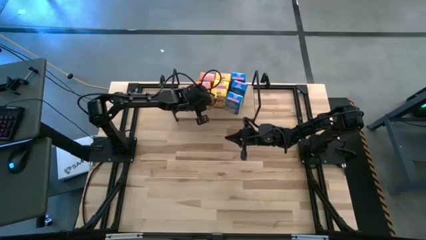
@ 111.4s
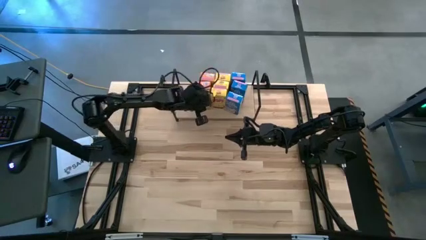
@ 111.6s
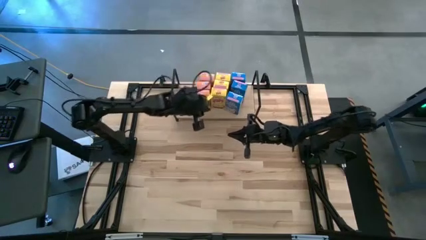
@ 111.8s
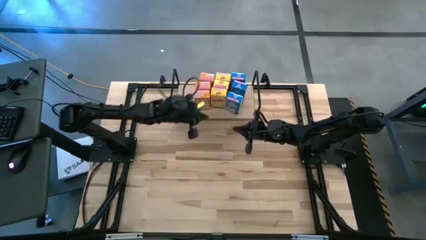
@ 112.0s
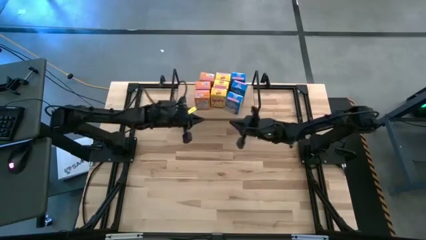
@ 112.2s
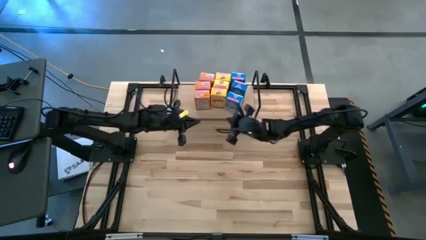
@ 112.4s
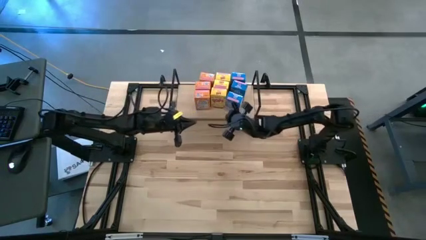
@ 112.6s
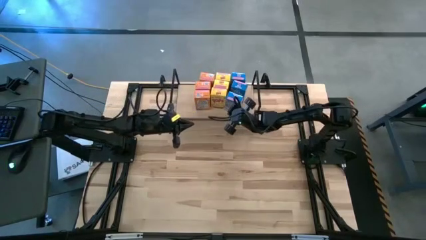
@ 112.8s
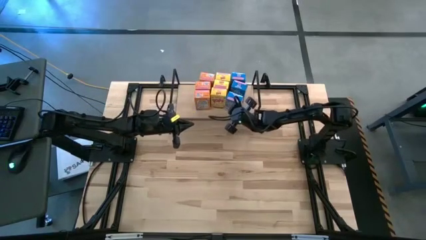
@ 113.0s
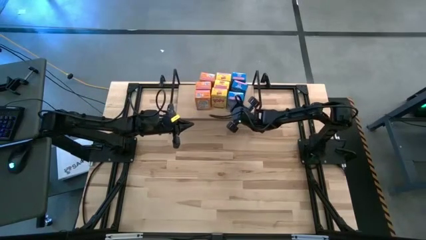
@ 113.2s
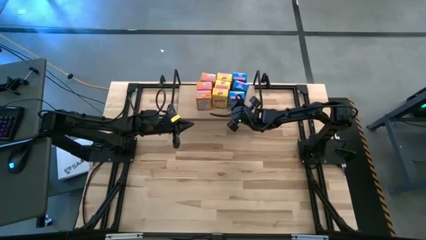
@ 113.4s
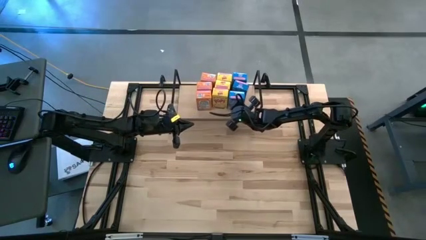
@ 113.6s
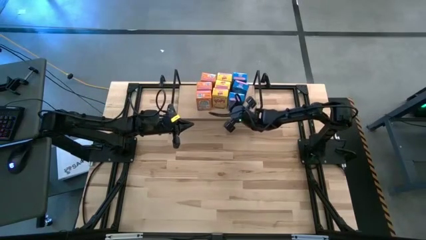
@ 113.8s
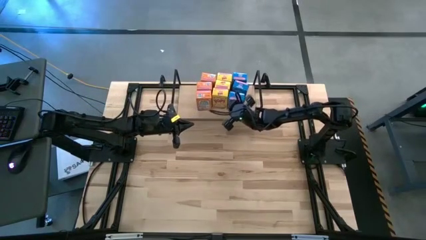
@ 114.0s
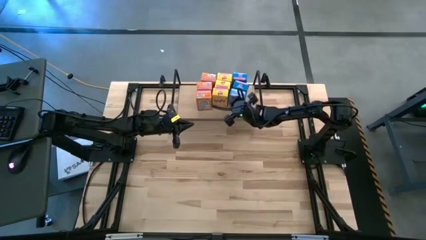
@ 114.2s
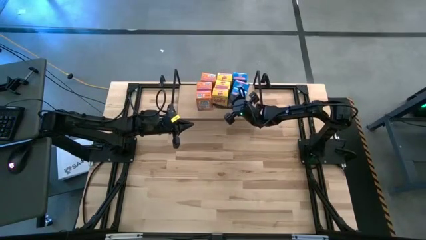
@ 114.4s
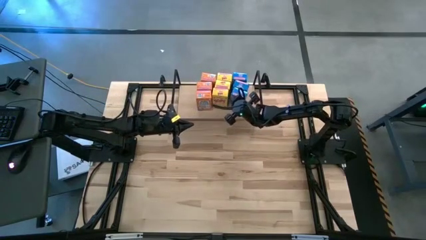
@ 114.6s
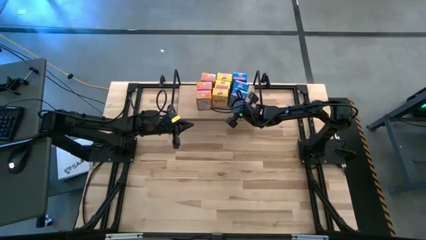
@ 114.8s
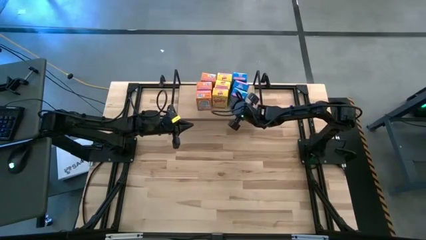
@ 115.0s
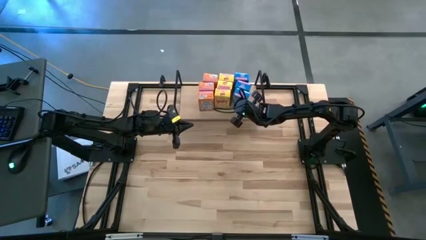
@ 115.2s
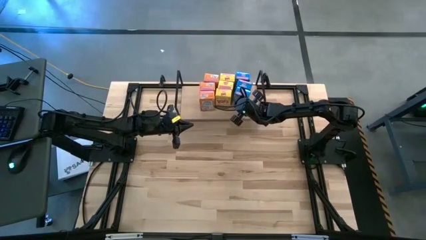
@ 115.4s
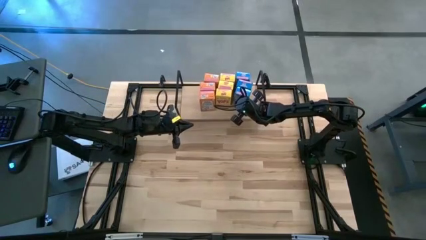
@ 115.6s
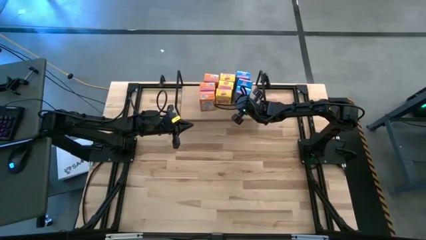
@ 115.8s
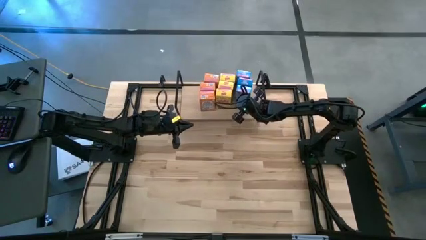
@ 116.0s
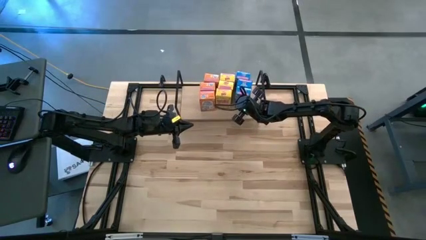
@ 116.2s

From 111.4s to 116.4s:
Task: Stack cereal on shelf
Adjust the blue cereal boxes on the shelf

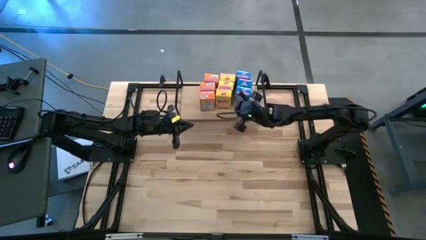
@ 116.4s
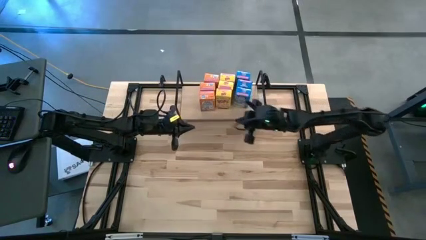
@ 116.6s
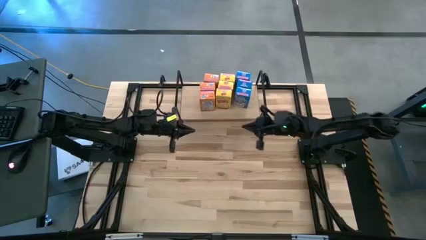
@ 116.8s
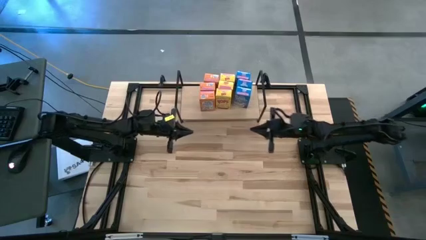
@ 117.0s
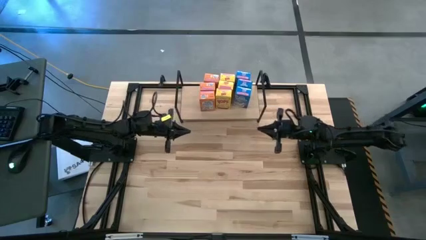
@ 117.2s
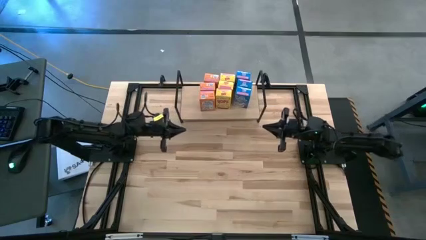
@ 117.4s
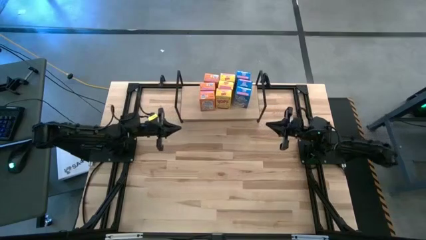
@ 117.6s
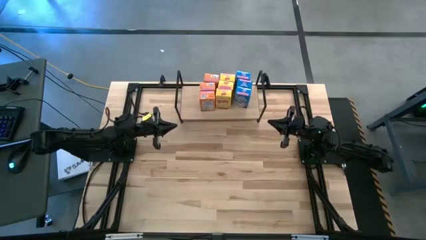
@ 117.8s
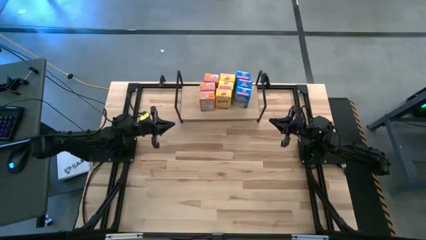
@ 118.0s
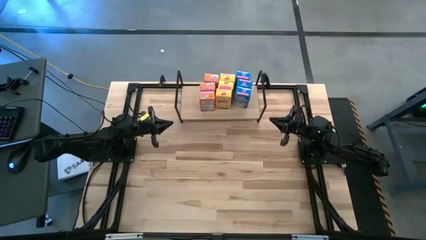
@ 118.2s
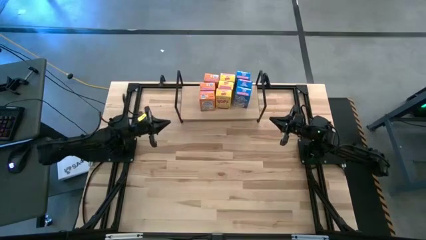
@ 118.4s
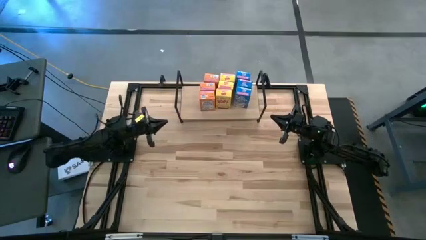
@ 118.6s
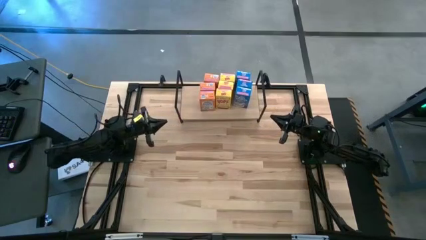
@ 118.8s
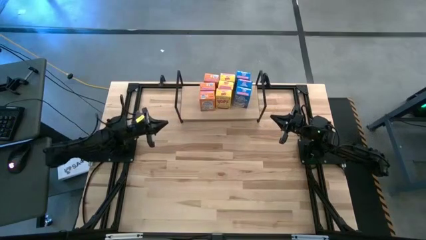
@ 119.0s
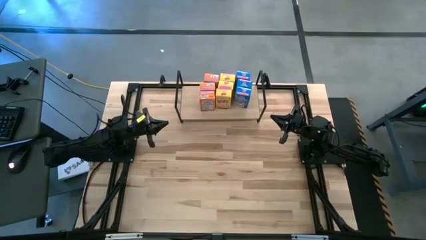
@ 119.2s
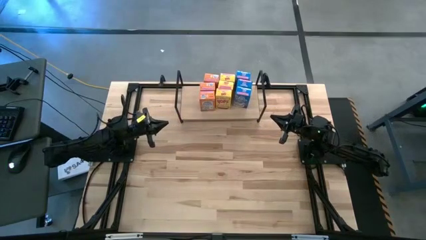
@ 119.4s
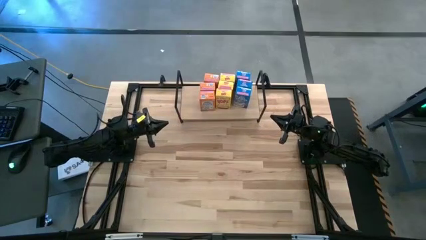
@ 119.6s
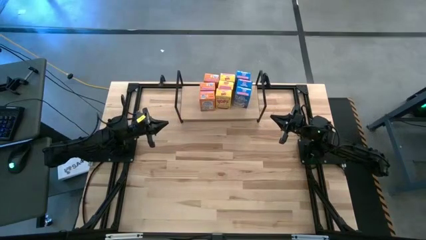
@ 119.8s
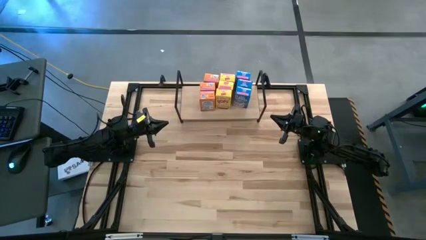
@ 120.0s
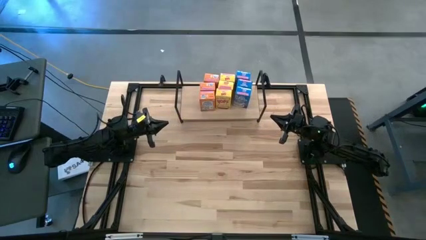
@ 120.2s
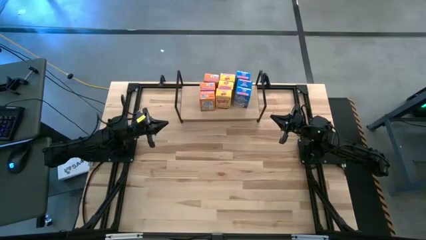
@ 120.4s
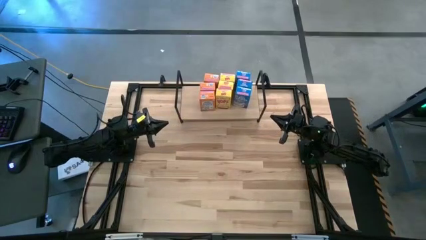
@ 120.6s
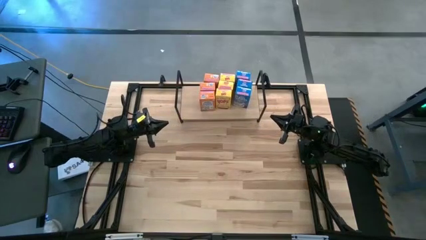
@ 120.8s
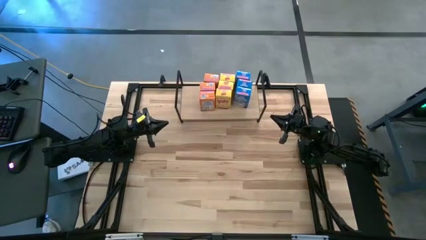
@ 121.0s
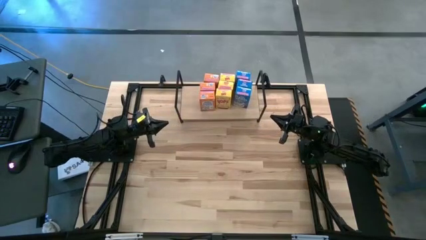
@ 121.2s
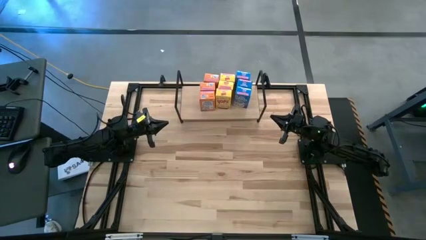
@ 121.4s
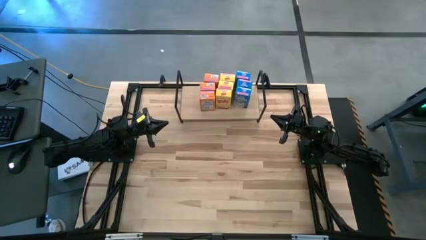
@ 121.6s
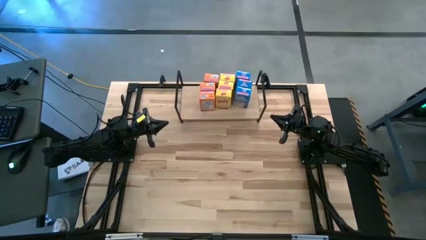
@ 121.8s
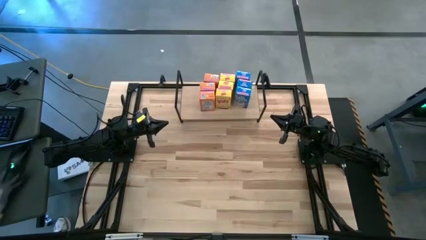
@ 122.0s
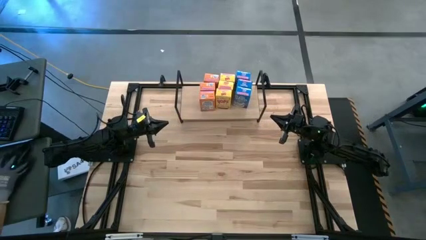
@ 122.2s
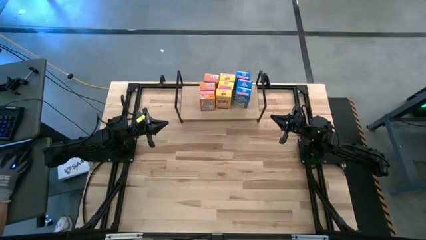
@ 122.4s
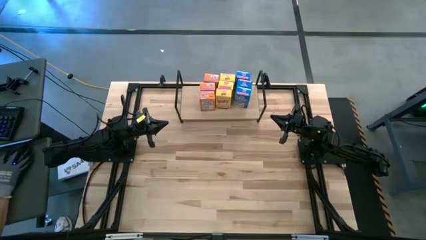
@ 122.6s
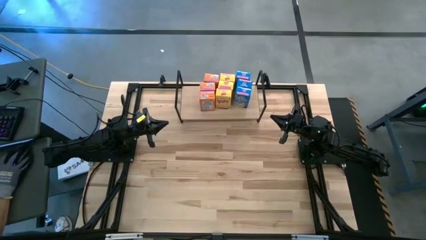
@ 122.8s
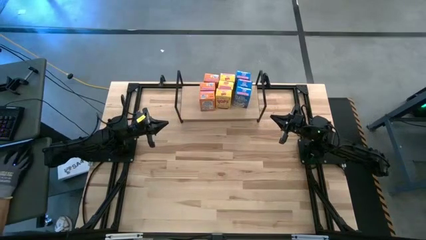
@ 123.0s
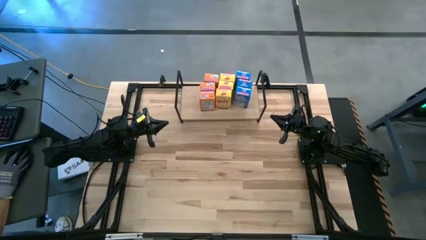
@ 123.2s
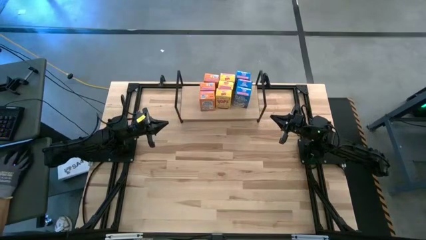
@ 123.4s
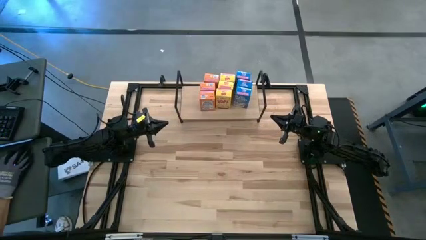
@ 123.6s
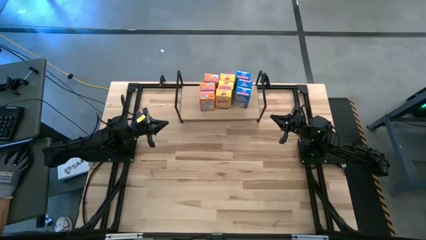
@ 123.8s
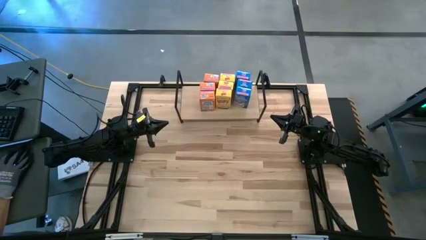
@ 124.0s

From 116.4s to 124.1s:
Return to Home Position

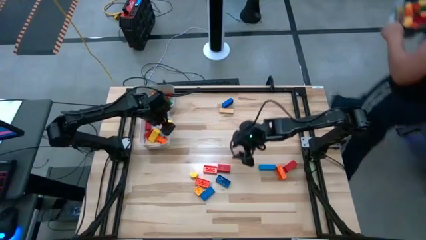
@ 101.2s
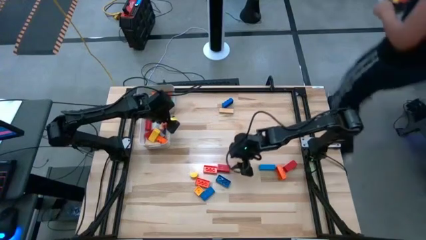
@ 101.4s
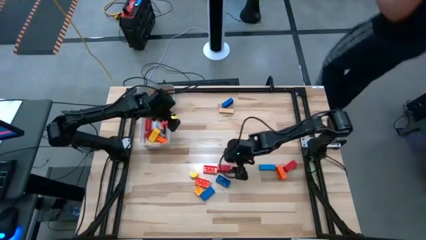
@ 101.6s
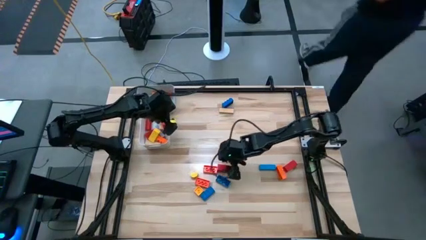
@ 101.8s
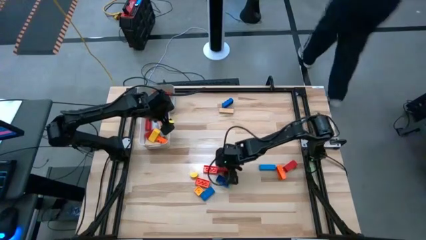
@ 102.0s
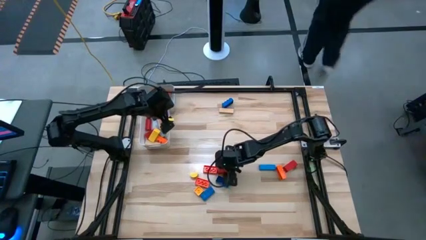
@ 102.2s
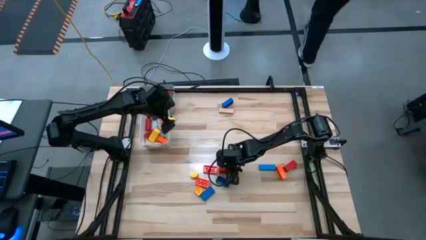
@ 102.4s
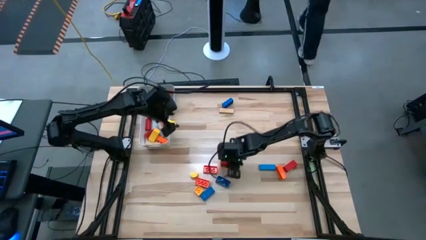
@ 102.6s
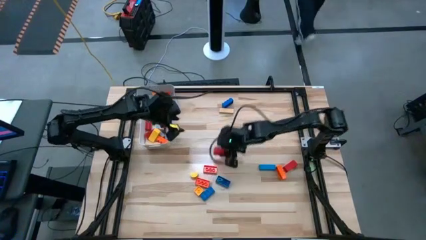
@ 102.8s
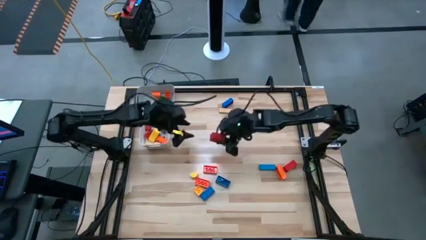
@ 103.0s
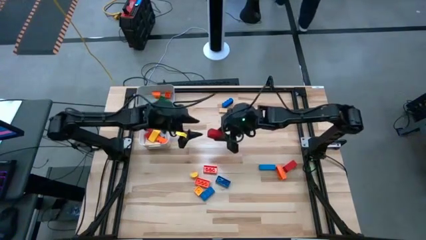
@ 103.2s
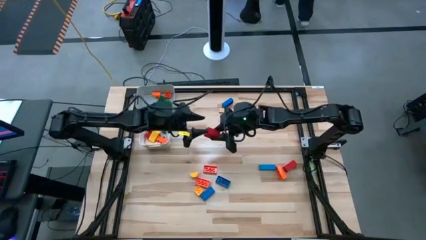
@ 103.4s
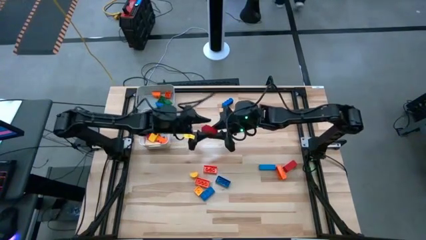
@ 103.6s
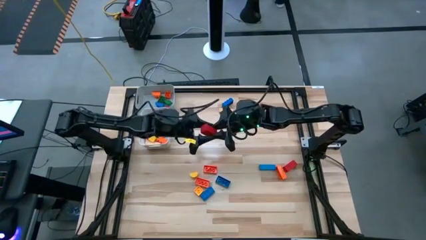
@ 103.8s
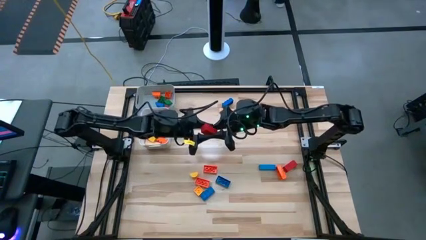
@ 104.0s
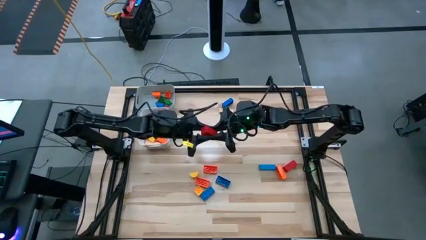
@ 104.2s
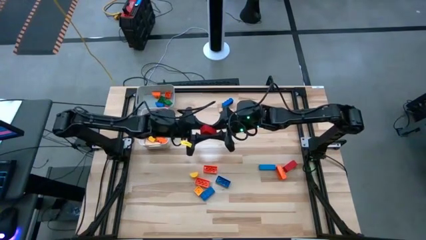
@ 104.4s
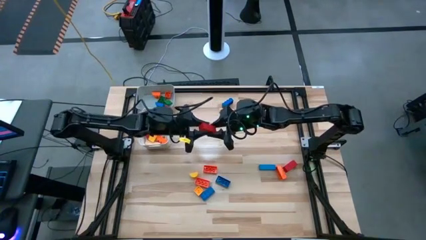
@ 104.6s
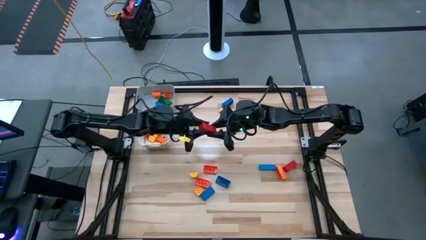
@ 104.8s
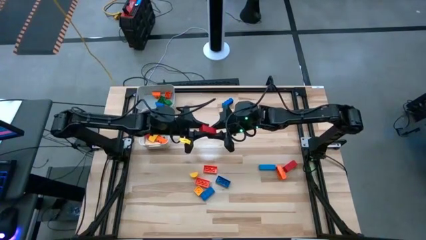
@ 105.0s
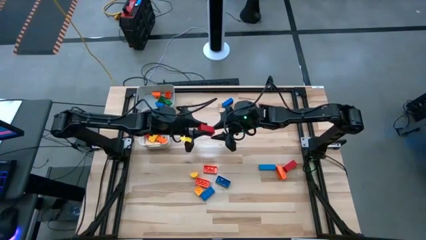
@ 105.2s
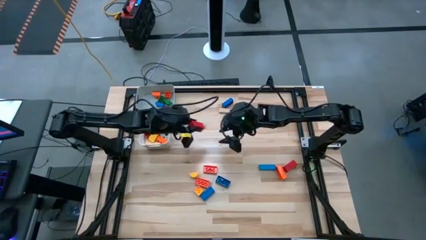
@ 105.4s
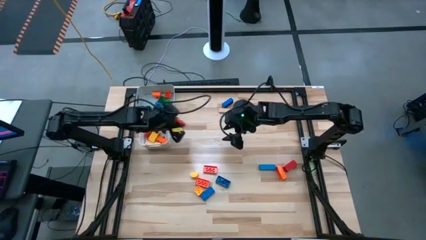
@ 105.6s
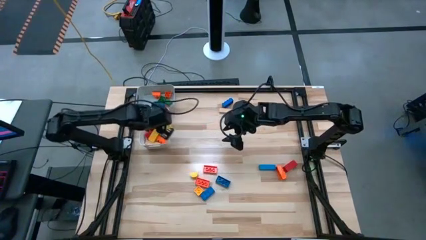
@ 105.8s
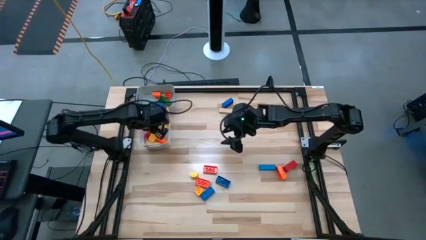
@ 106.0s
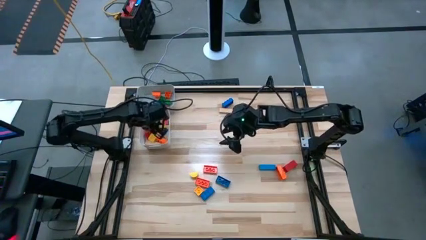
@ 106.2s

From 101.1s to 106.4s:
Task: Sort blocks by size
Put the large red wooden block into the white bin
